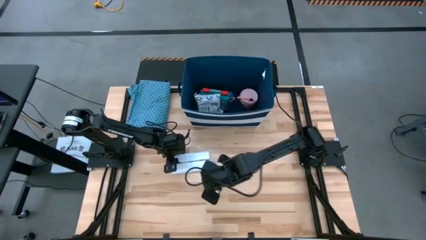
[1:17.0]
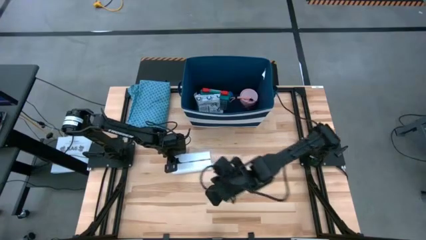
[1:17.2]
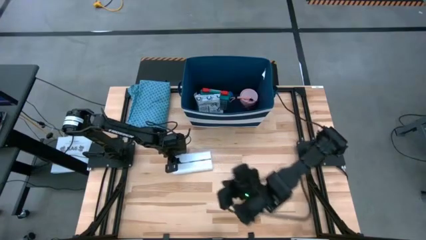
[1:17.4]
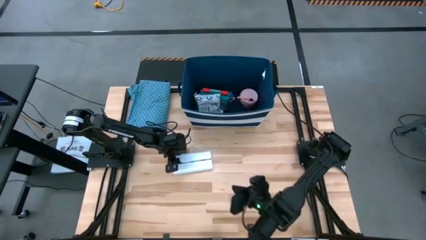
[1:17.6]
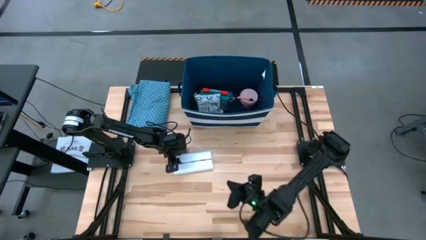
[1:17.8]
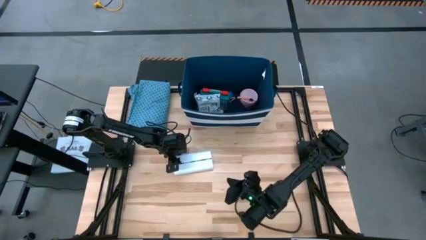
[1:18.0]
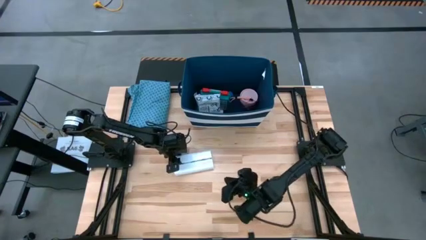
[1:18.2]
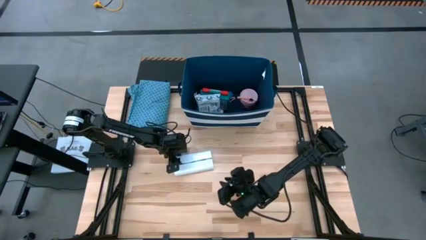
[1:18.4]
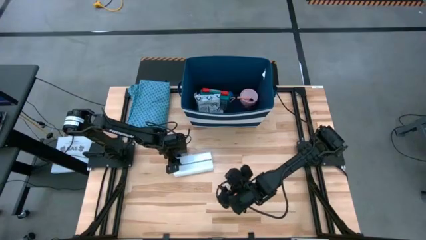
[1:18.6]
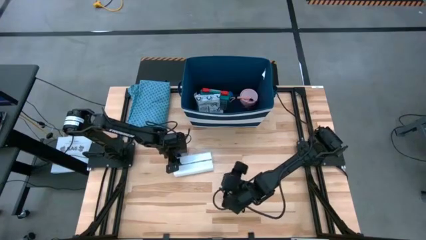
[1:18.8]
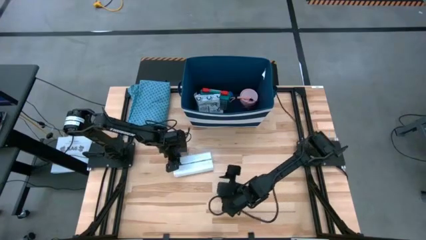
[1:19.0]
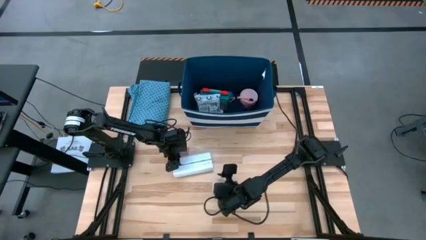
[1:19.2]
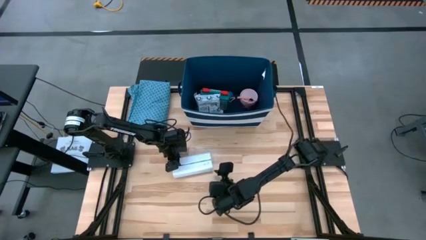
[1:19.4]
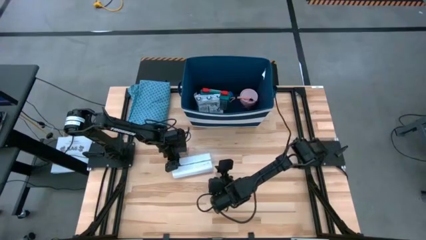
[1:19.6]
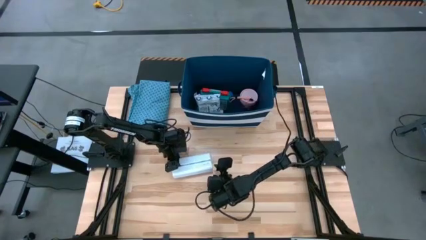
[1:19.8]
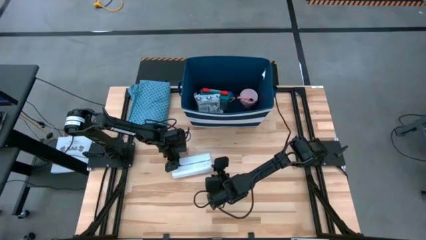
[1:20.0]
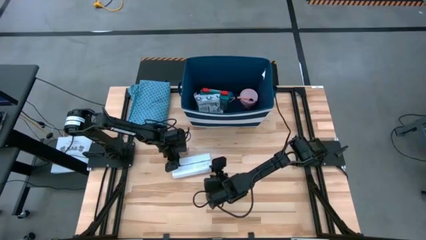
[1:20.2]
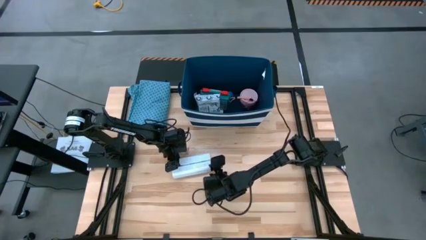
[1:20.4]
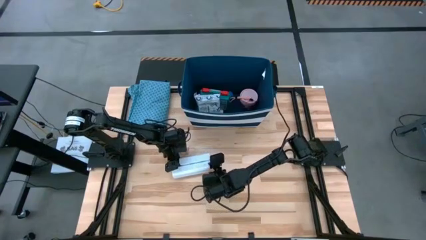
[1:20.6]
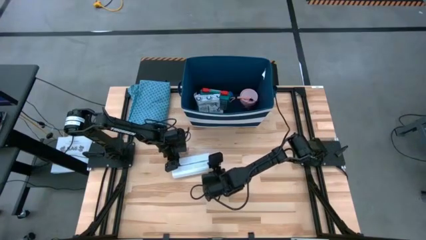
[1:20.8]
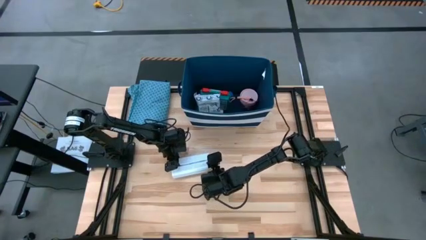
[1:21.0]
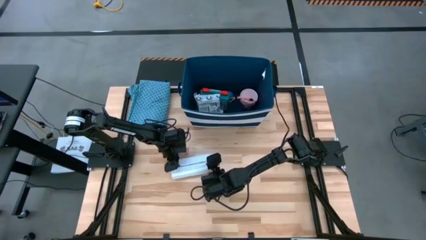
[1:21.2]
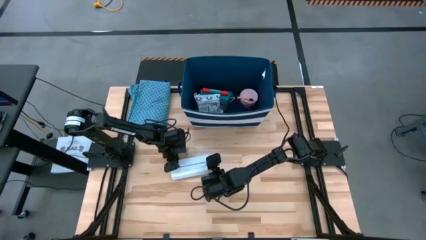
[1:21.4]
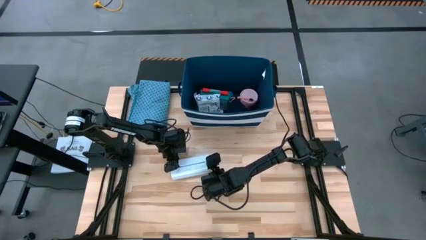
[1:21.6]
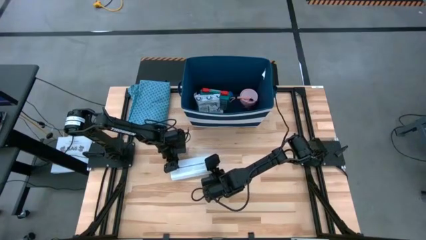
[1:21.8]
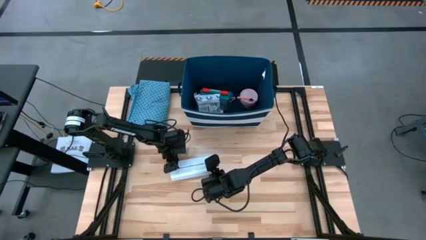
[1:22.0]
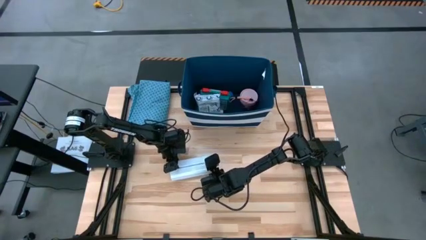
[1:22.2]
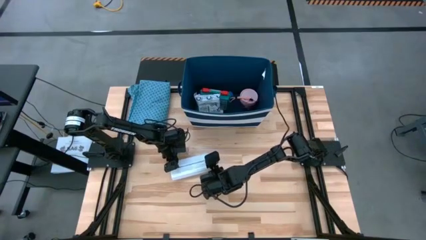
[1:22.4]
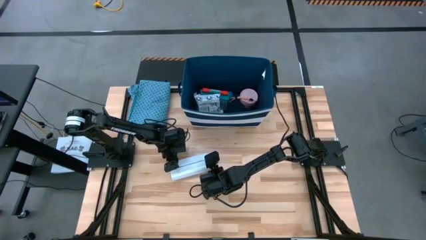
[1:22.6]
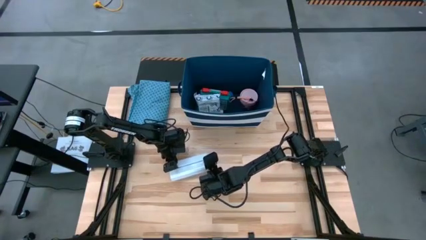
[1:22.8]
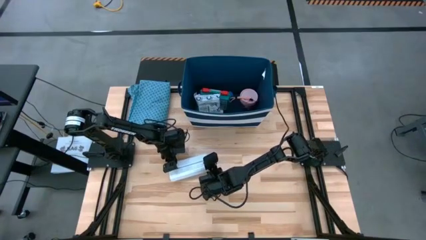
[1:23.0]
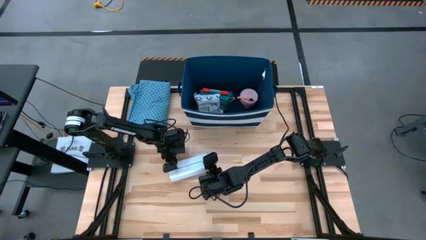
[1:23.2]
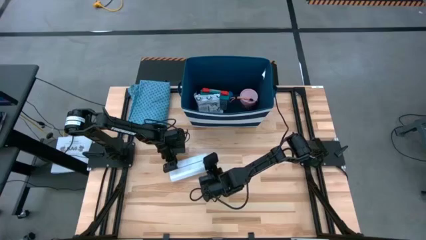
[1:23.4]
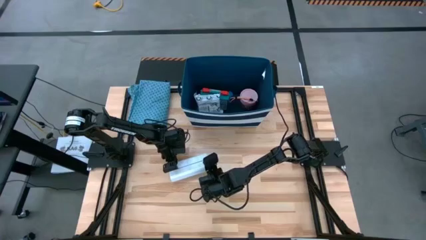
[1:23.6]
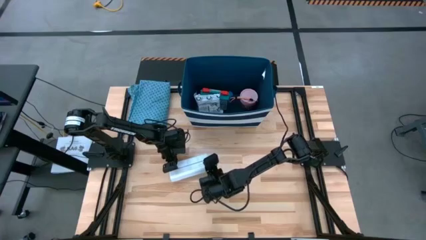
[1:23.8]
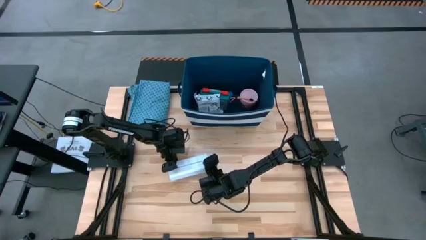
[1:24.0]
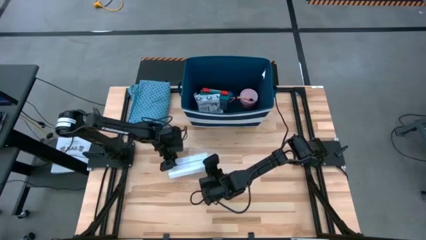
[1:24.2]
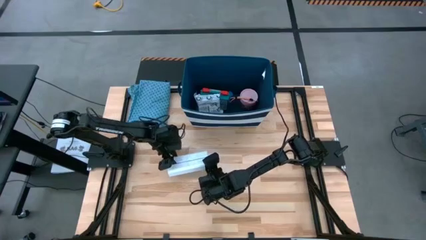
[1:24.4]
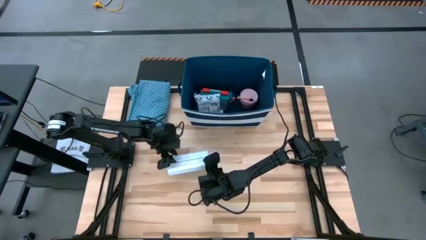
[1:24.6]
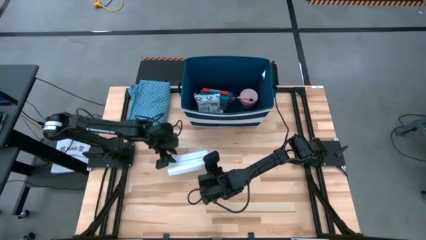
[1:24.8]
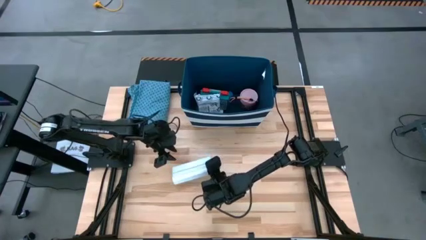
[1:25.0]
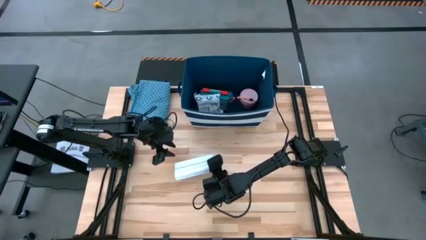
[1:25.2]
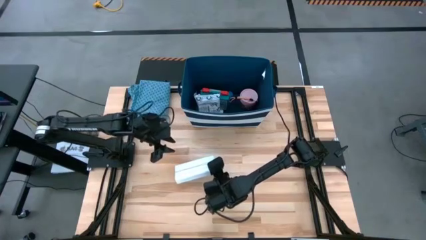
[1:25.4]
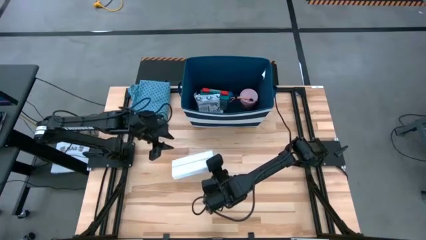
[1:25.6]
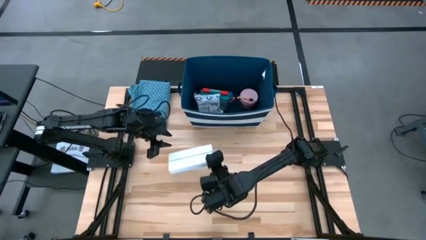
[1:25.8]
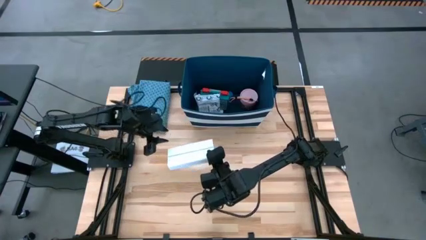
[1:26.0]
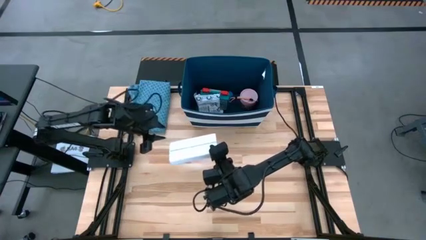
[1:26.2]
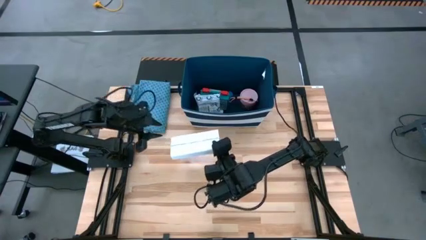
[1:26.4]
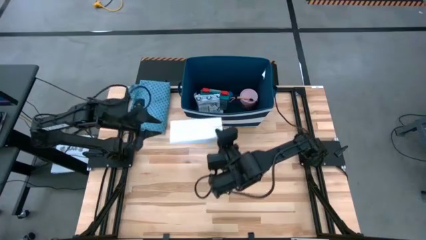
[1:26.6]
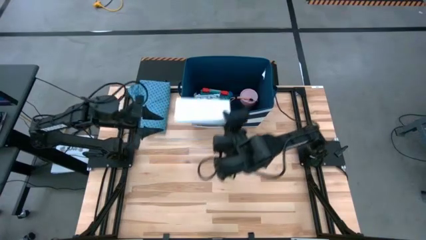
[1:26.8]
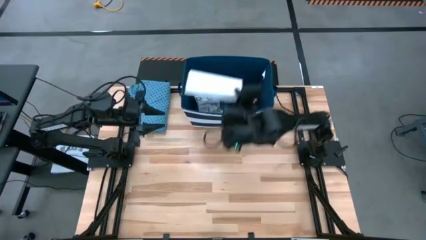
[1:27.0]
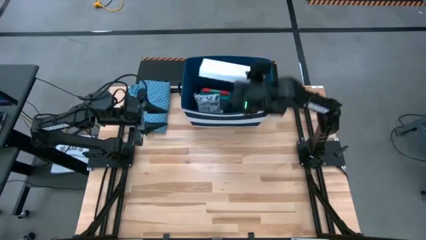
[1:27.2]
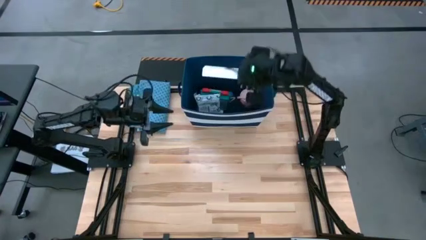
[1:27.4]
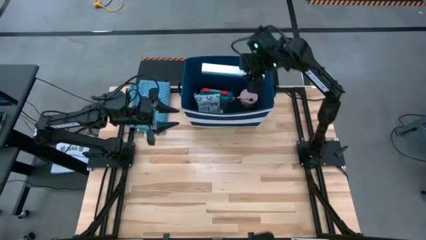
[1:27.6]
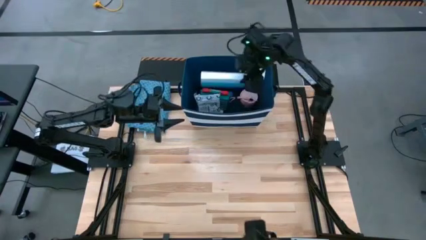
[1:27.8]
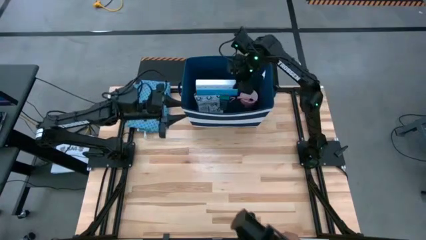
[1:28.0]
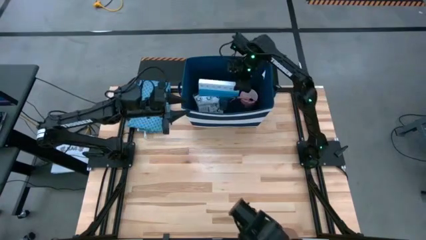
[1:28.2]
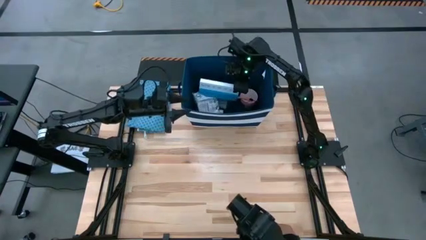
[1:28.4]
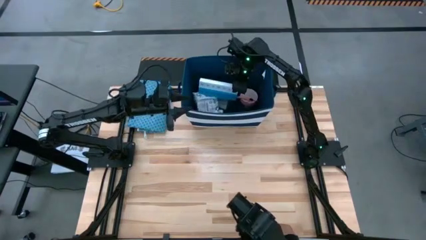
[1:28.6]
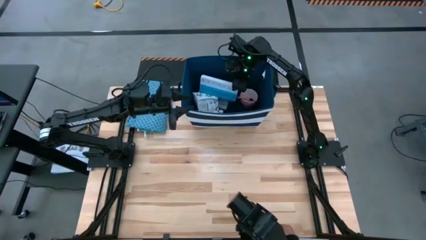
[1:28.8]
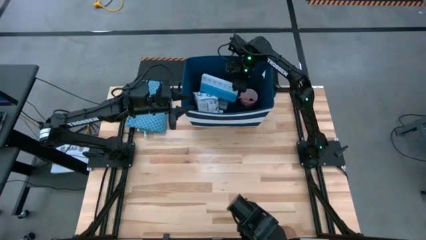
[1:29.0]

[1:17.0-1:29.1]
Task: Pick & place medical supplies in basket/bin
Put the white pill organizer into the blue bin
